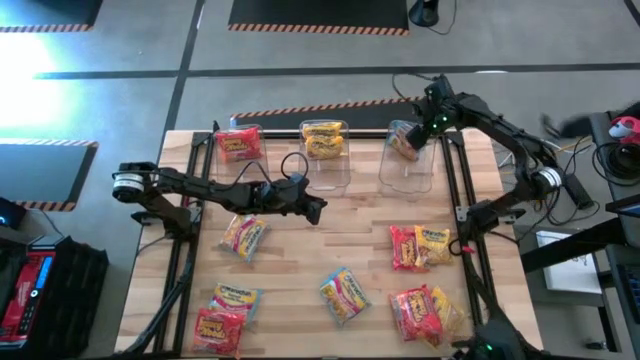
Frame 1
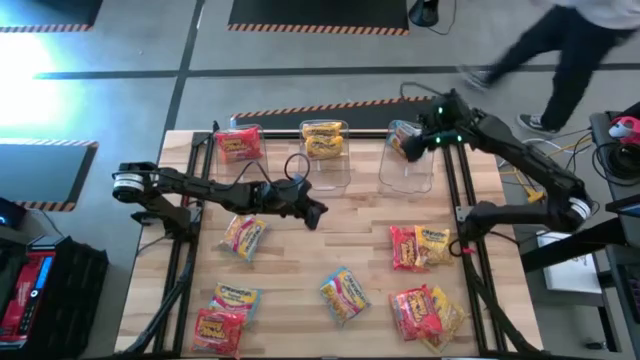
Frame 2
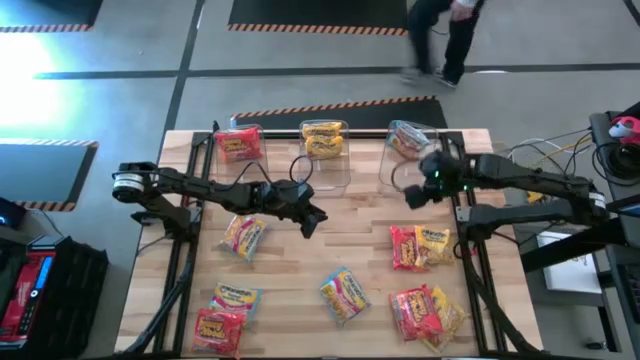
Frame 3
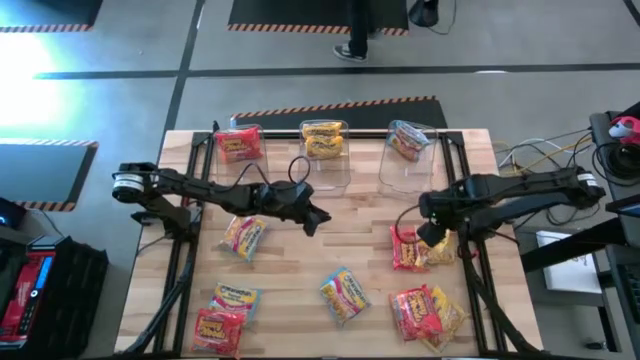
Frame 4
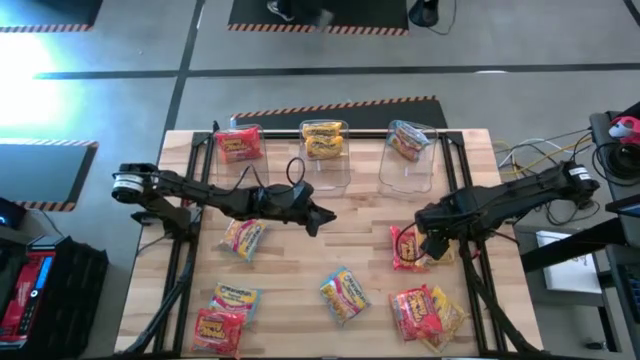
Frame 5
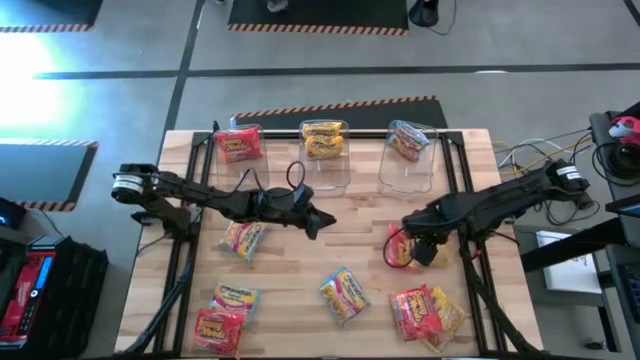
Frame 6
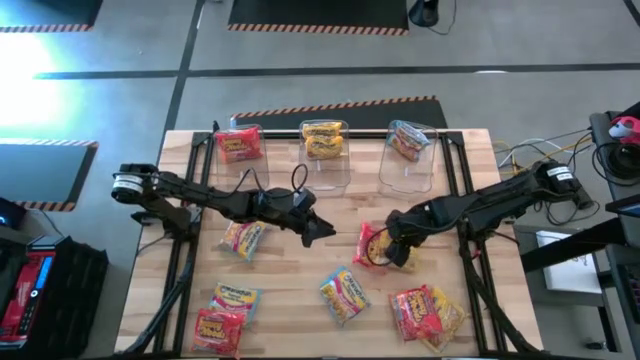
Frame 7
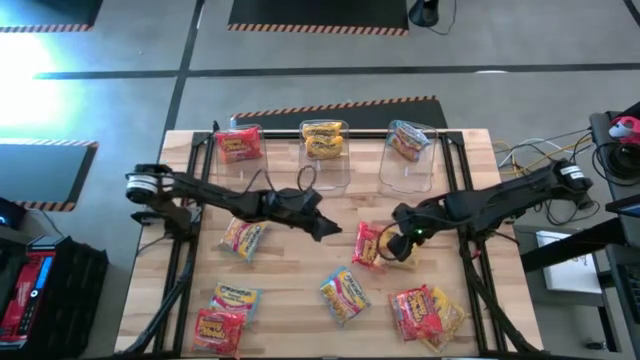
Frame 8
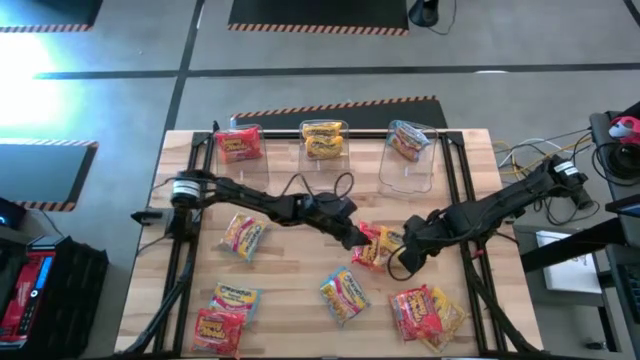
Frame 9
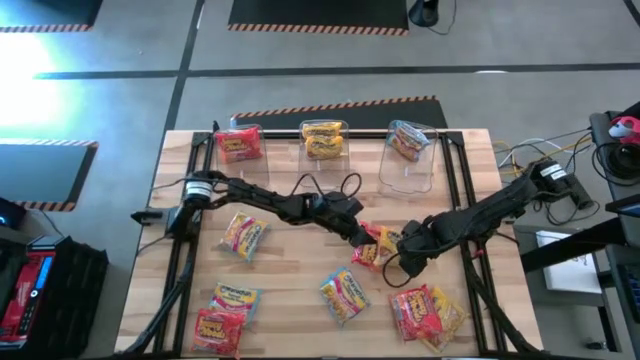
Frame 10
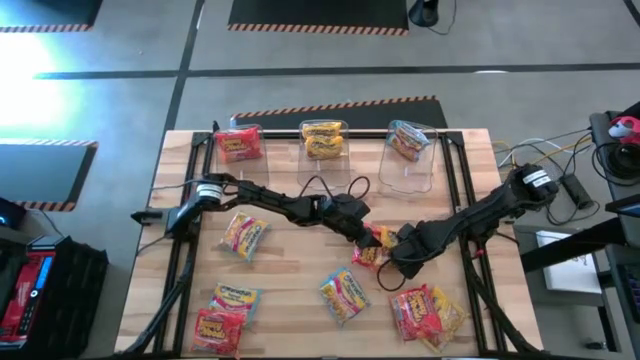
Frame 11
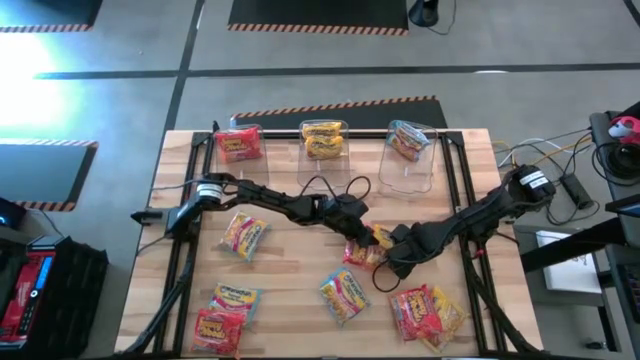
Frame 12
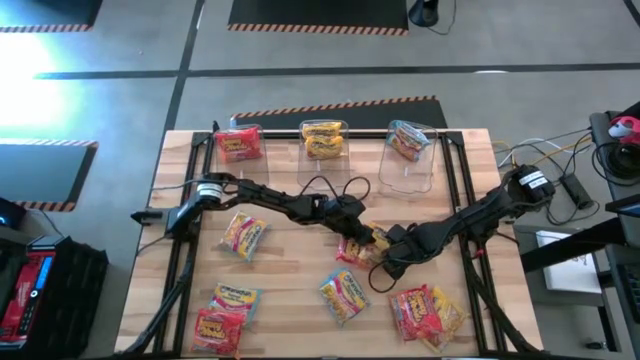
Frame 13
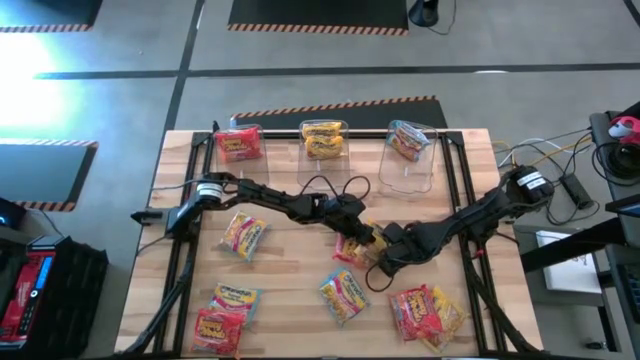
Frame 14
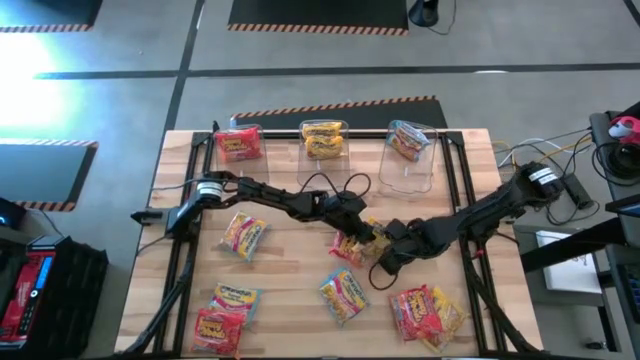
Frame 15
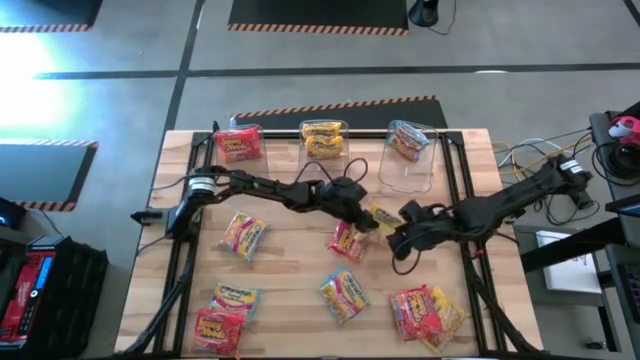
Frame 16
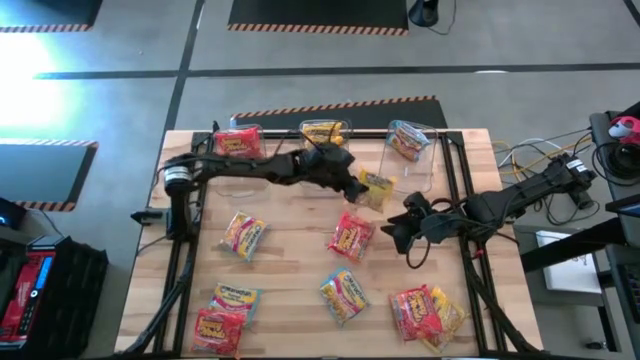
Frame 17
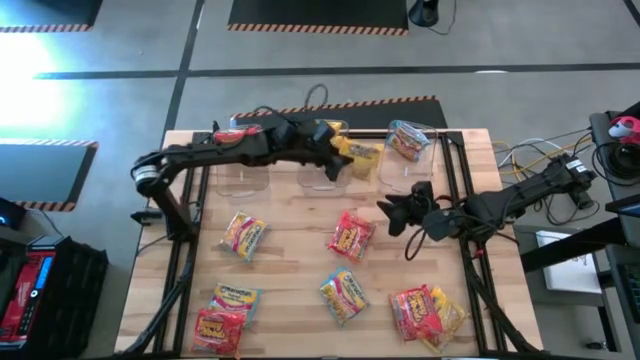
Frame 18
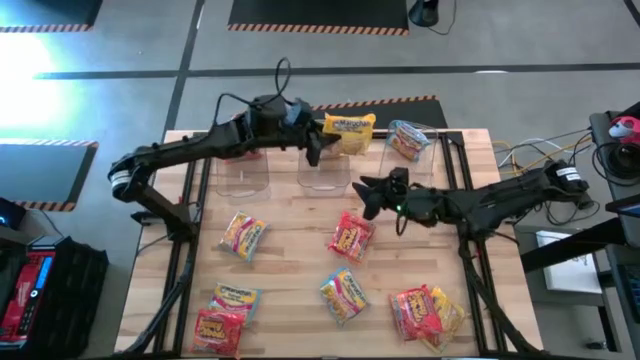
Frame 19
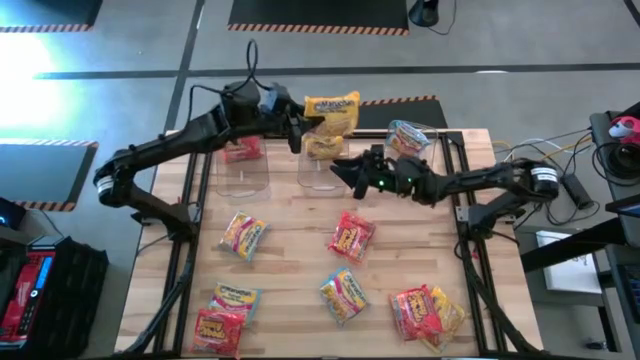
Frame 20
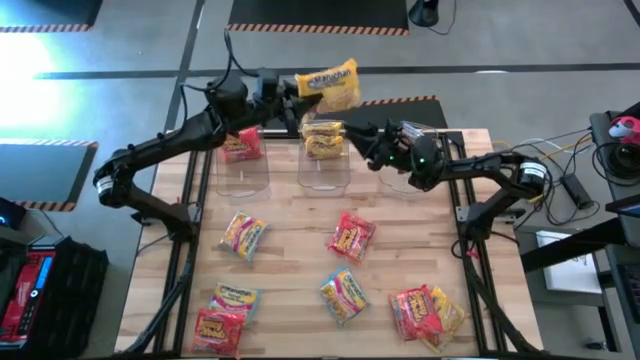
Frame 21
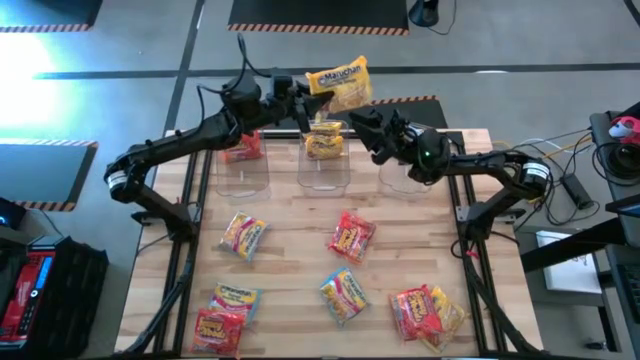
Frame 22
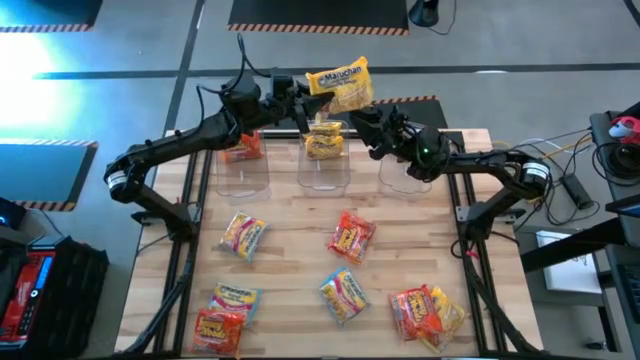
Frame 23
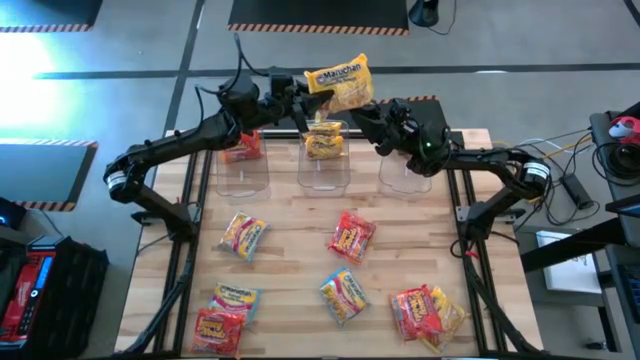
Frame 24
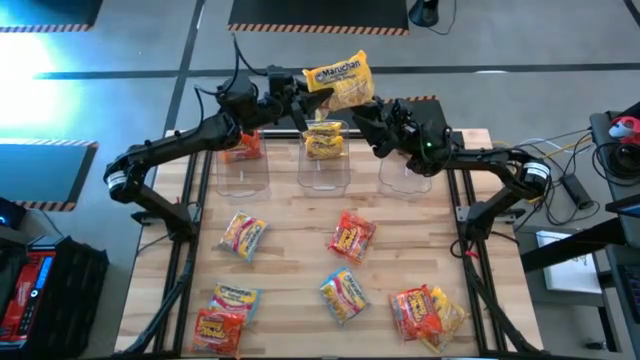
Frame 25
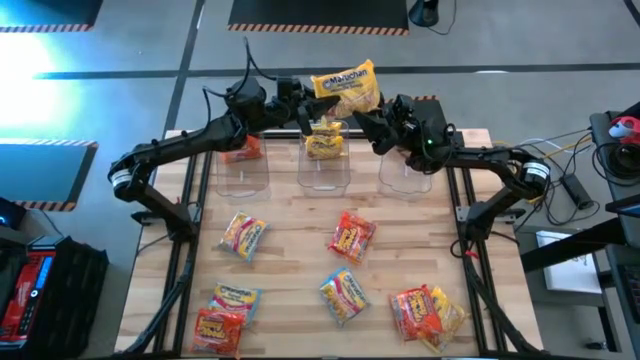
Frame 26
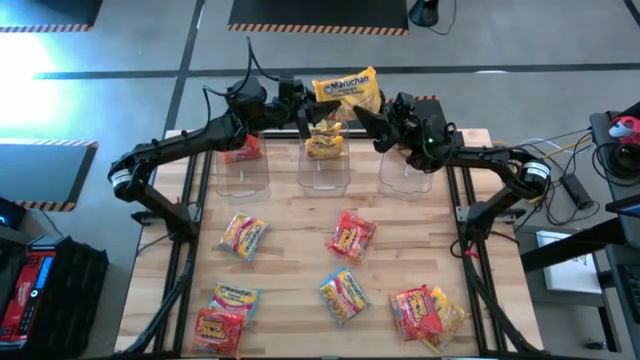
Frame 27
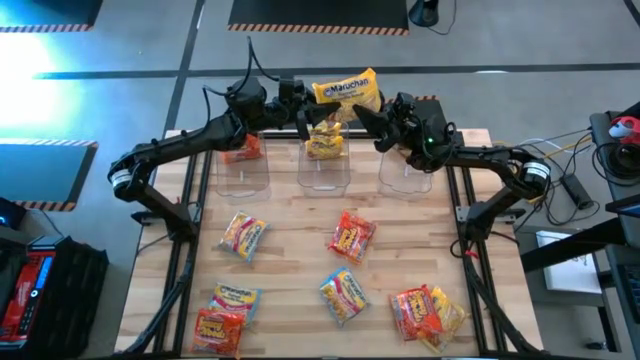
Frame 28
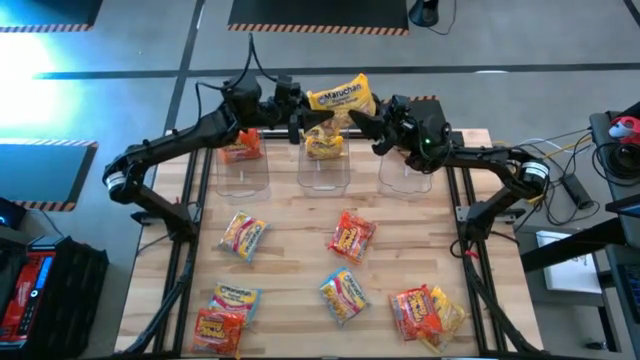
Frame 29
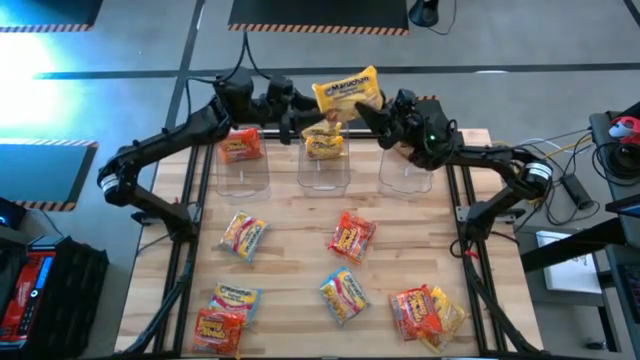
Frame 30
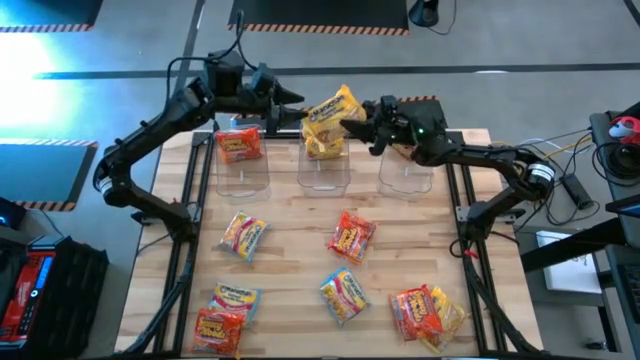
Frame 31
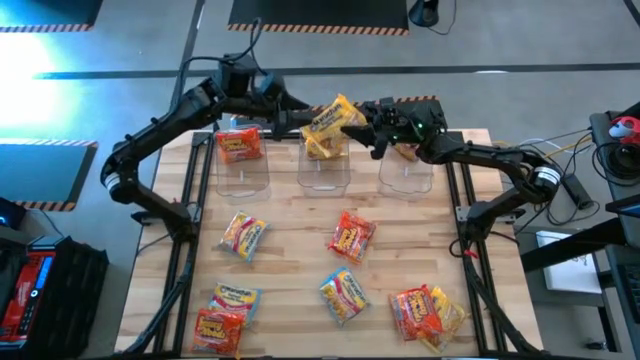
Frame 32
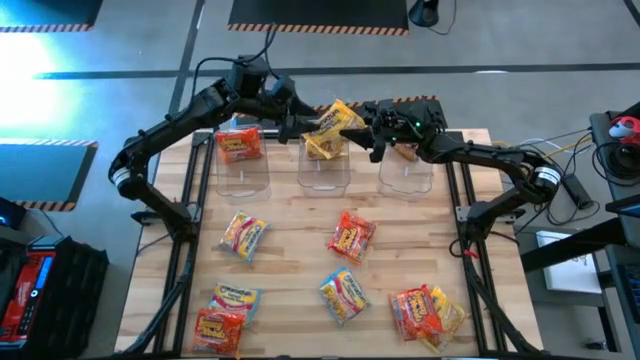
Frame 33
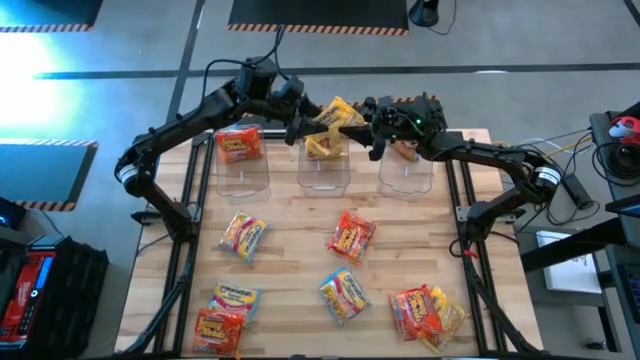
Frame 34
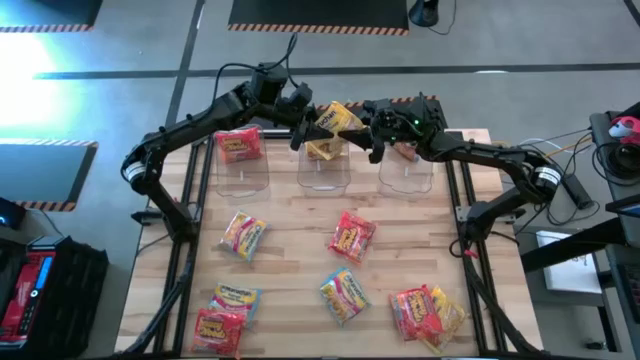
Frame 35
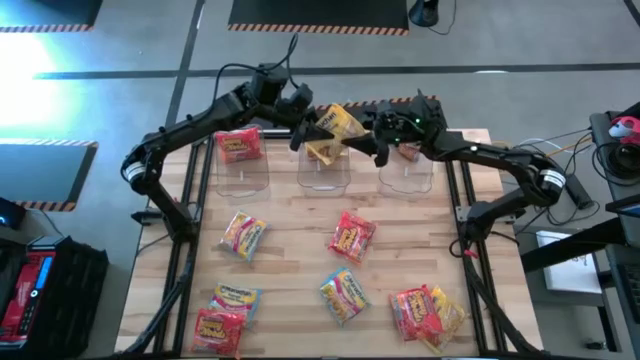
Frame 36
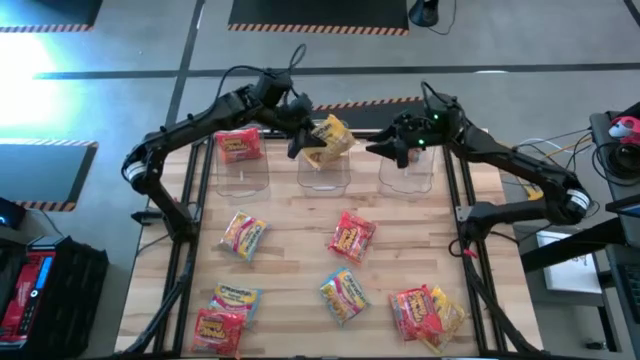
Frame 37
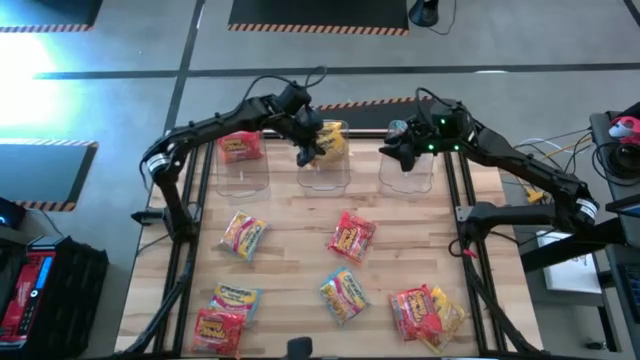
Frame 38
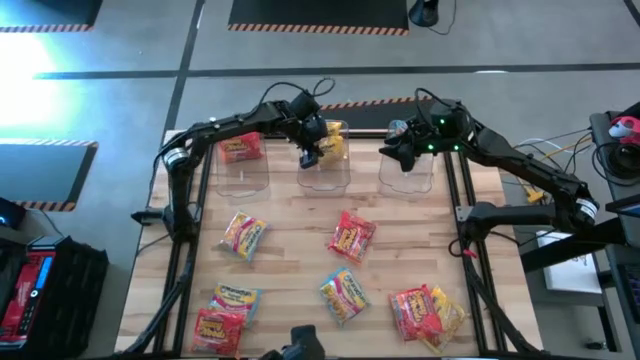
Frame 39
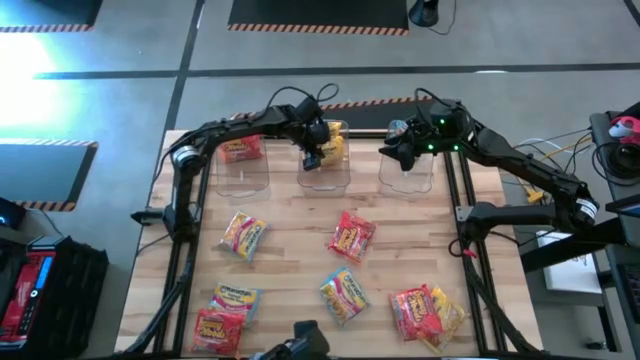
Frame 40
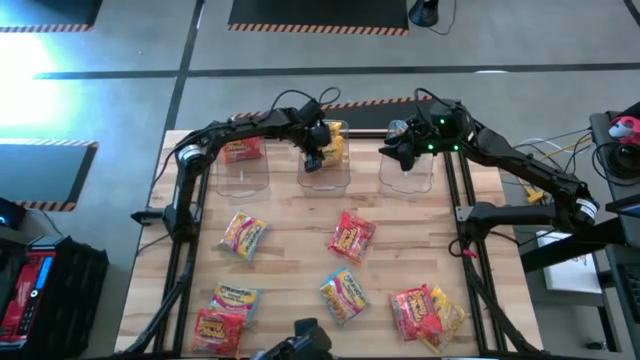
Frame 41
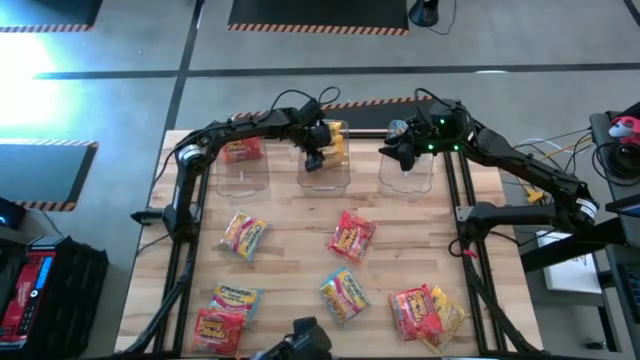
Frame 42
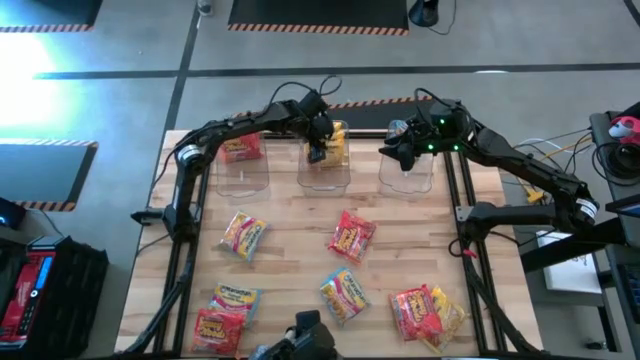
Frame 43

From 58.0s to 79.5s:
Task: Sort Maruchan noodles
Put the yellow noodle pack into the middle transparent bin
